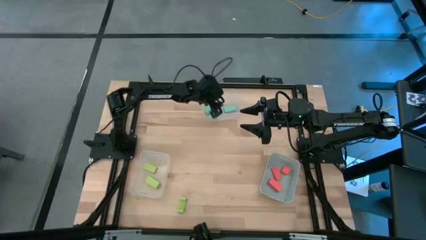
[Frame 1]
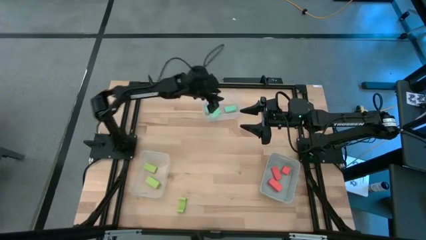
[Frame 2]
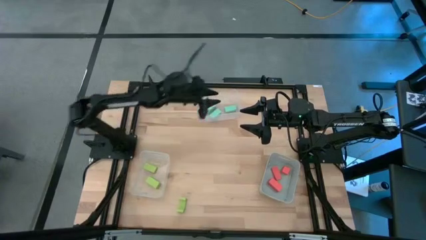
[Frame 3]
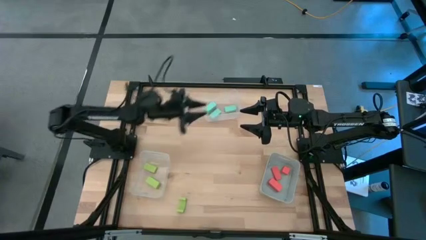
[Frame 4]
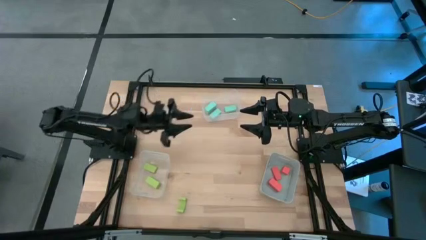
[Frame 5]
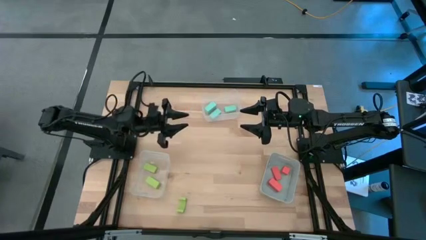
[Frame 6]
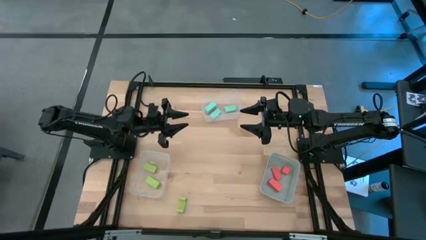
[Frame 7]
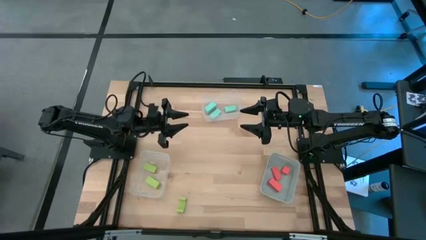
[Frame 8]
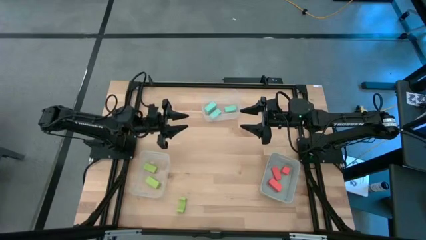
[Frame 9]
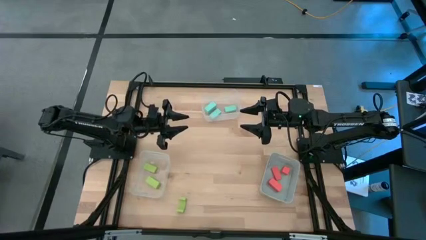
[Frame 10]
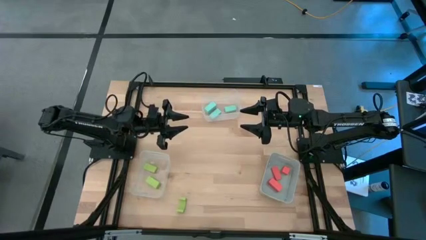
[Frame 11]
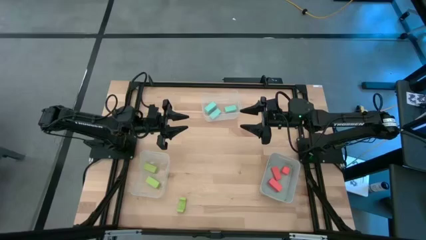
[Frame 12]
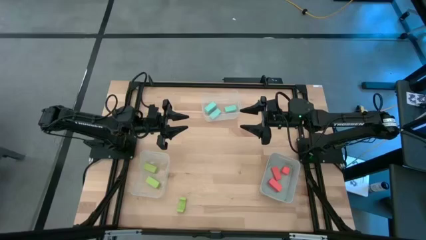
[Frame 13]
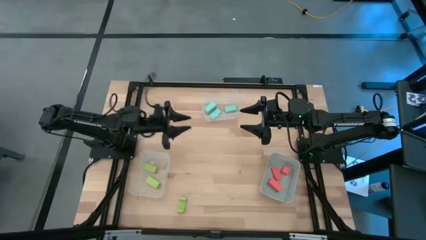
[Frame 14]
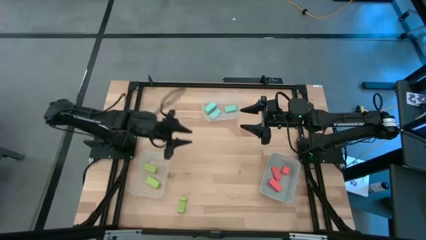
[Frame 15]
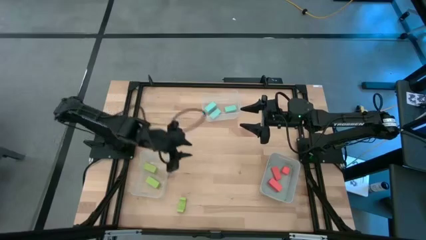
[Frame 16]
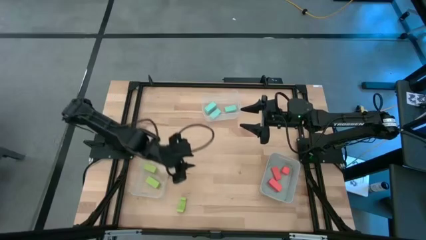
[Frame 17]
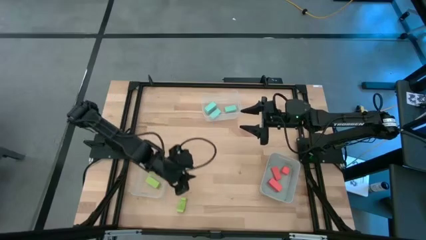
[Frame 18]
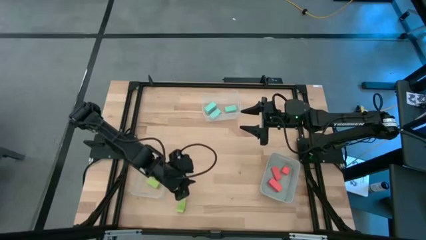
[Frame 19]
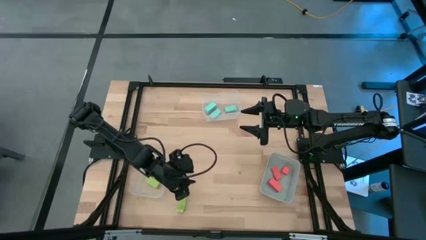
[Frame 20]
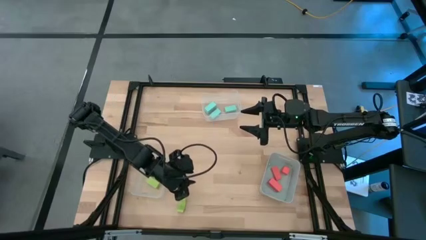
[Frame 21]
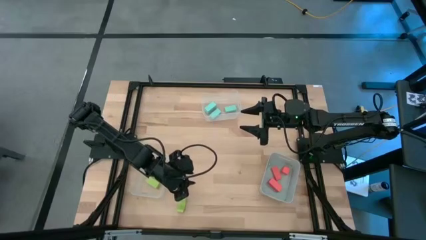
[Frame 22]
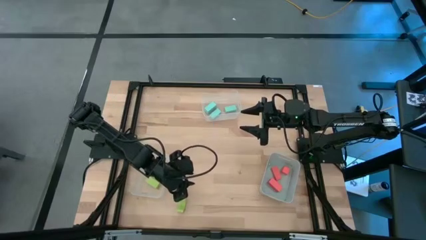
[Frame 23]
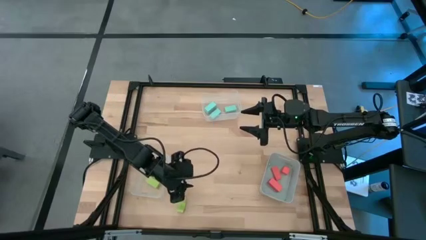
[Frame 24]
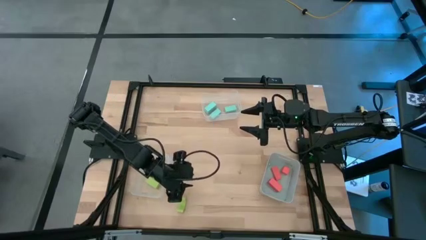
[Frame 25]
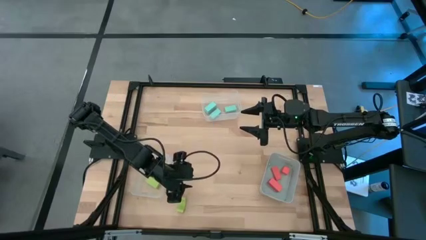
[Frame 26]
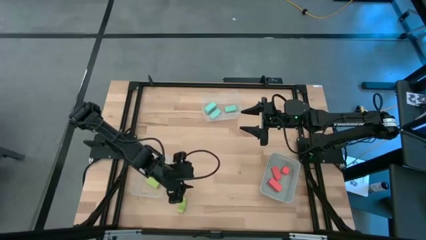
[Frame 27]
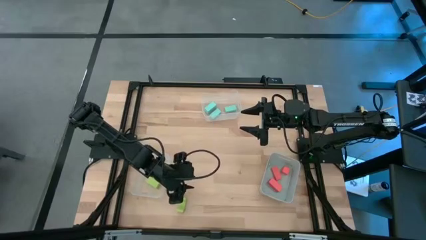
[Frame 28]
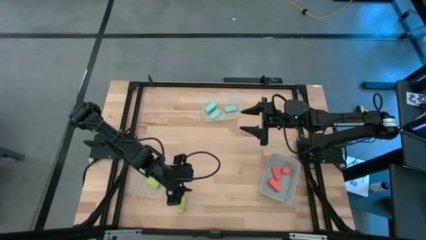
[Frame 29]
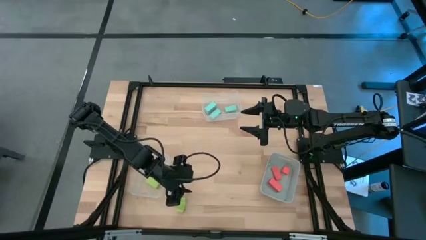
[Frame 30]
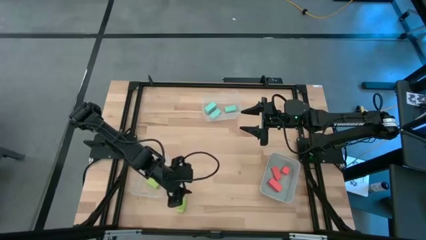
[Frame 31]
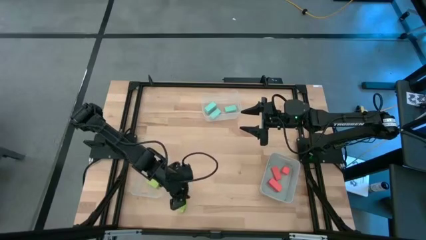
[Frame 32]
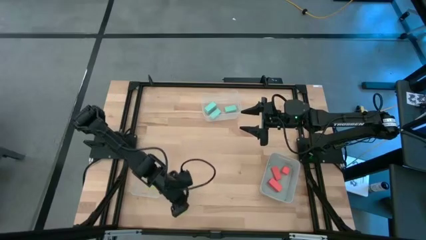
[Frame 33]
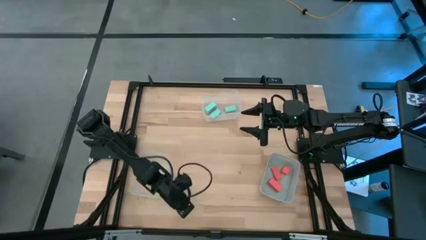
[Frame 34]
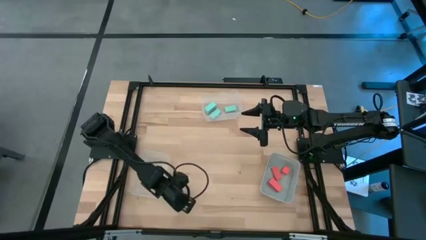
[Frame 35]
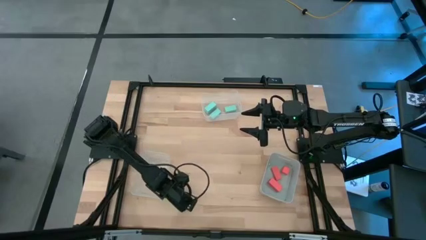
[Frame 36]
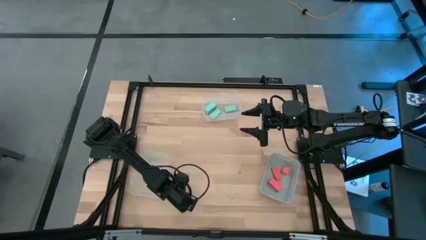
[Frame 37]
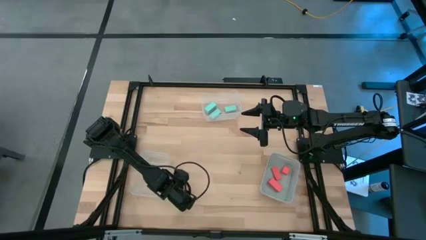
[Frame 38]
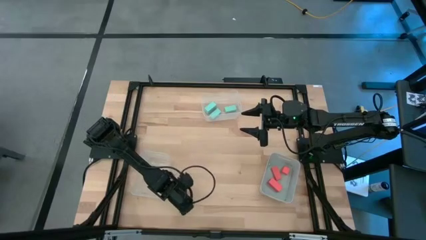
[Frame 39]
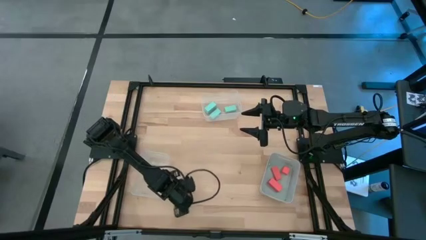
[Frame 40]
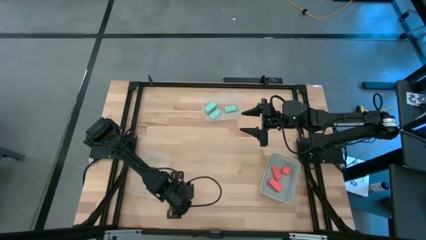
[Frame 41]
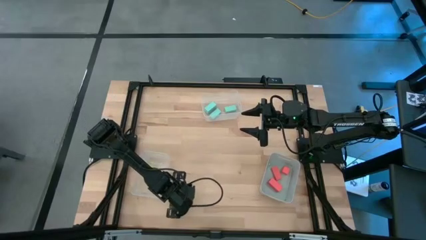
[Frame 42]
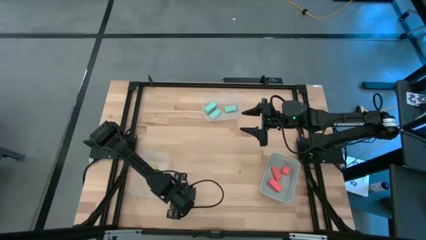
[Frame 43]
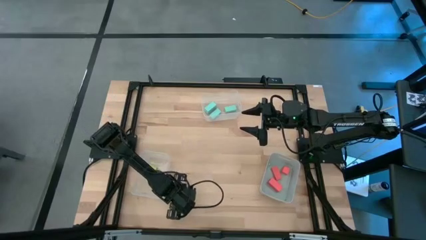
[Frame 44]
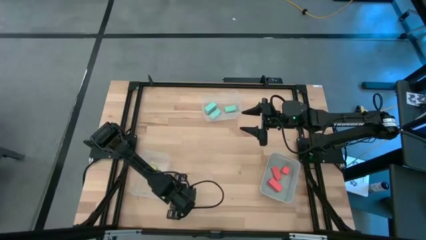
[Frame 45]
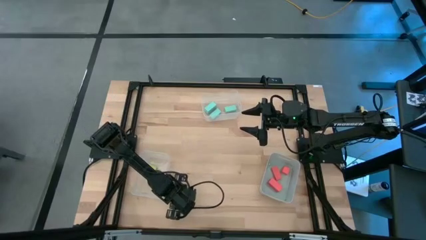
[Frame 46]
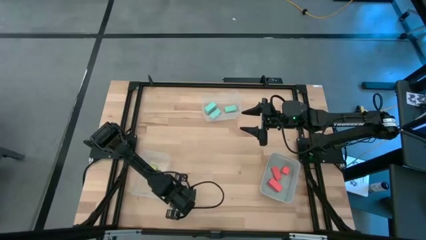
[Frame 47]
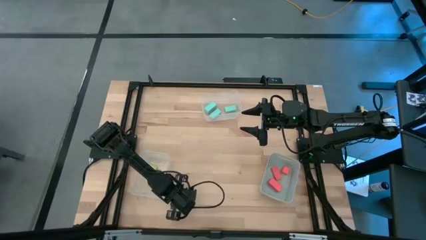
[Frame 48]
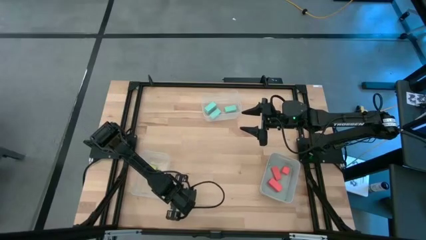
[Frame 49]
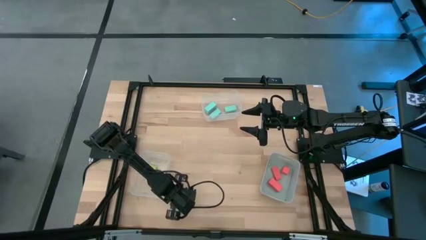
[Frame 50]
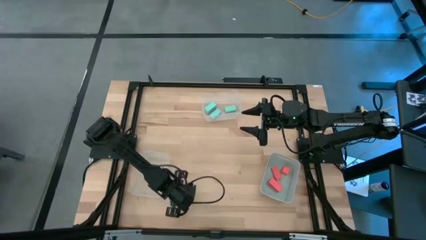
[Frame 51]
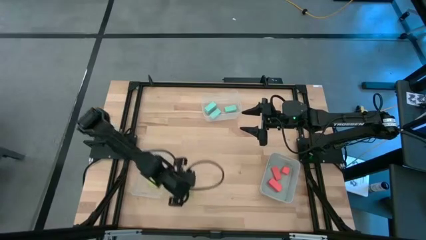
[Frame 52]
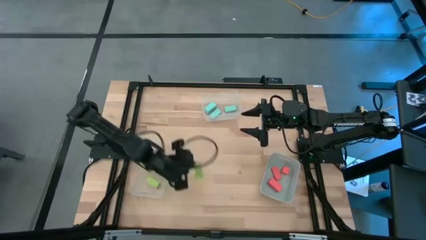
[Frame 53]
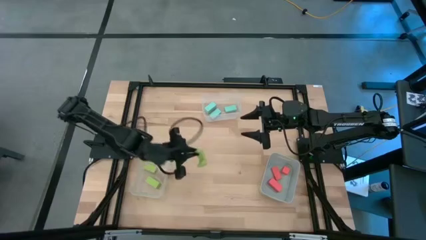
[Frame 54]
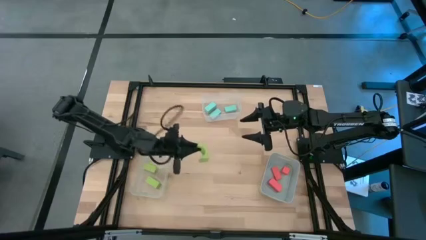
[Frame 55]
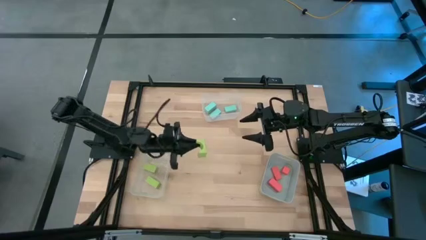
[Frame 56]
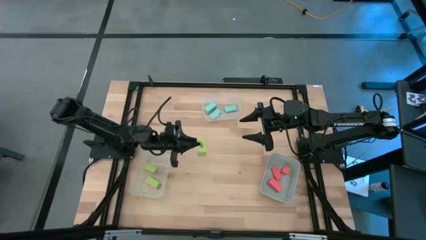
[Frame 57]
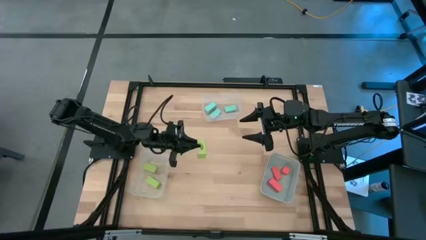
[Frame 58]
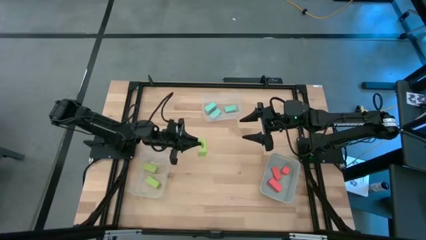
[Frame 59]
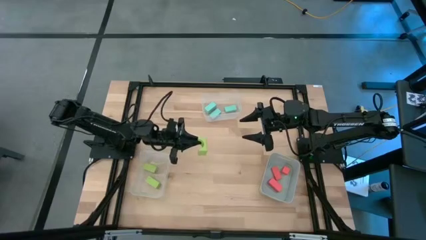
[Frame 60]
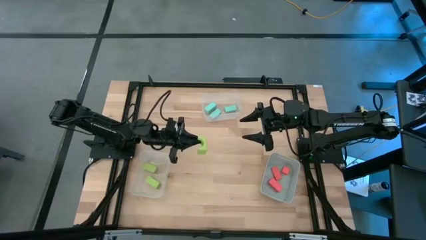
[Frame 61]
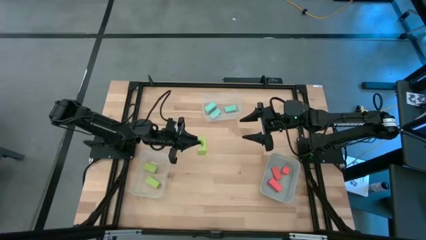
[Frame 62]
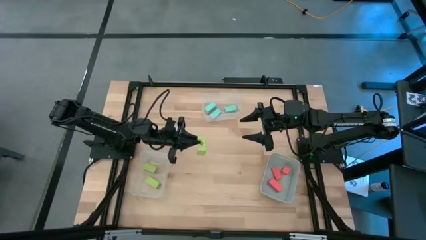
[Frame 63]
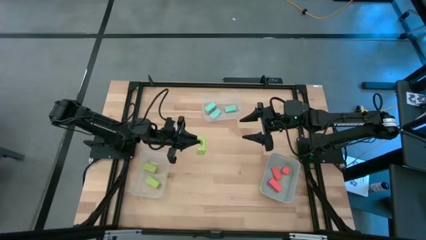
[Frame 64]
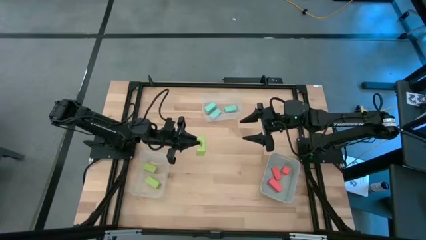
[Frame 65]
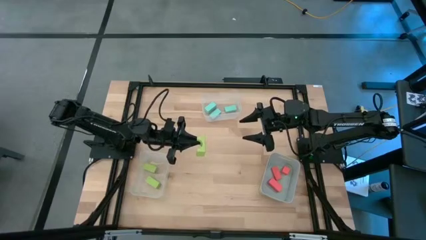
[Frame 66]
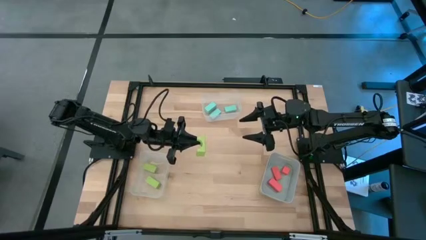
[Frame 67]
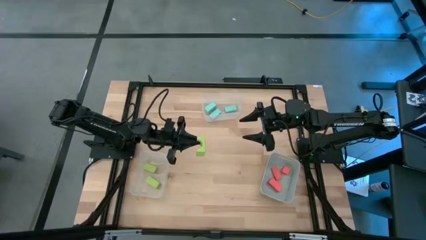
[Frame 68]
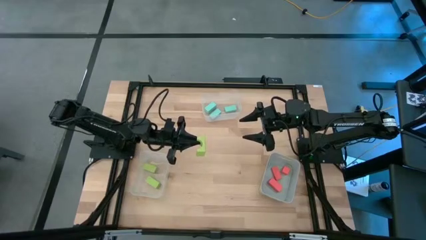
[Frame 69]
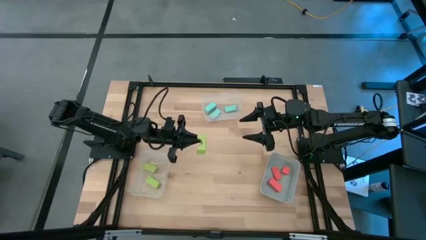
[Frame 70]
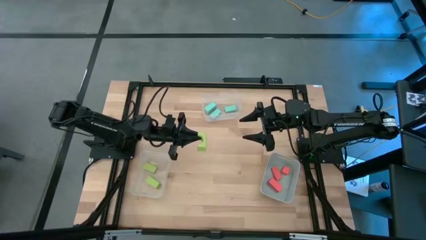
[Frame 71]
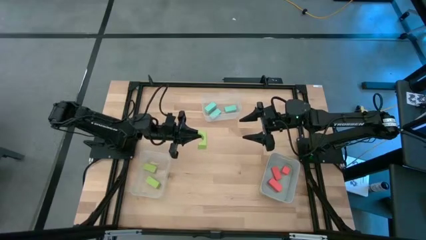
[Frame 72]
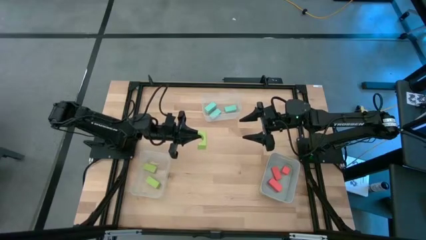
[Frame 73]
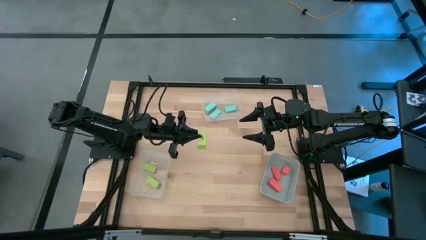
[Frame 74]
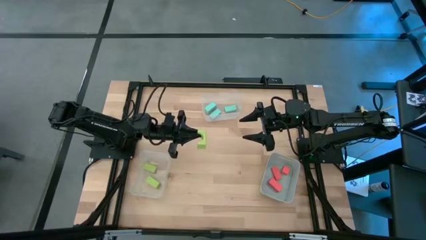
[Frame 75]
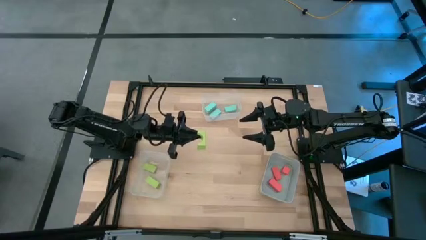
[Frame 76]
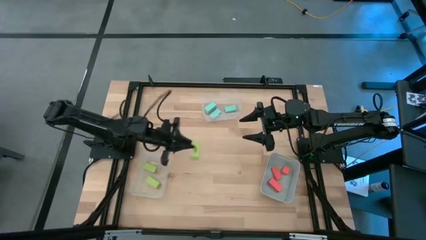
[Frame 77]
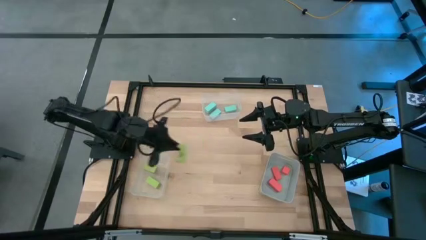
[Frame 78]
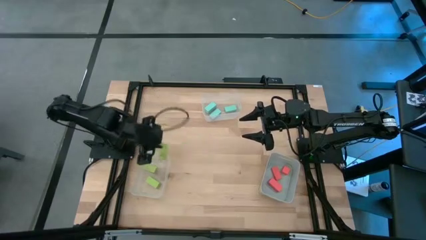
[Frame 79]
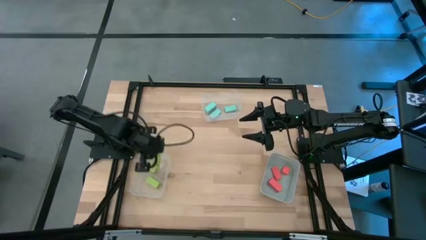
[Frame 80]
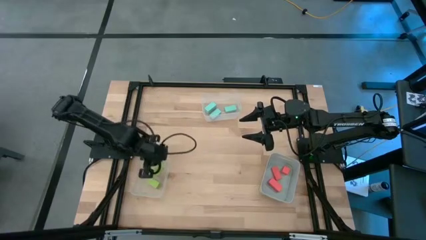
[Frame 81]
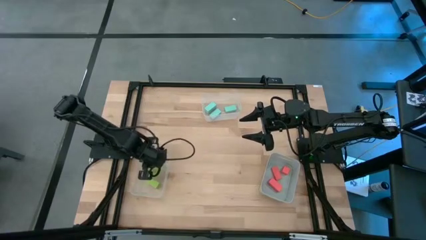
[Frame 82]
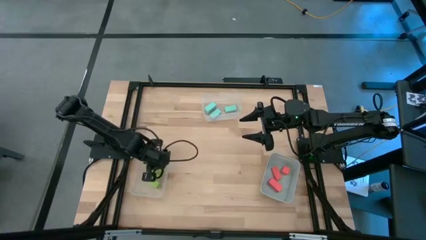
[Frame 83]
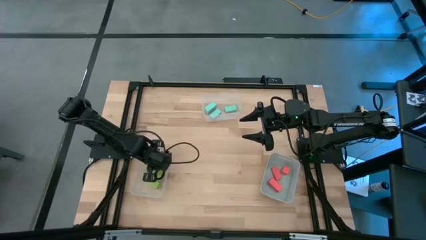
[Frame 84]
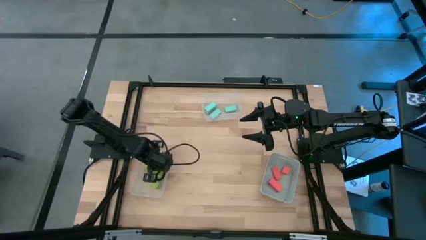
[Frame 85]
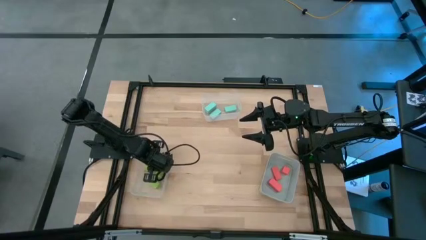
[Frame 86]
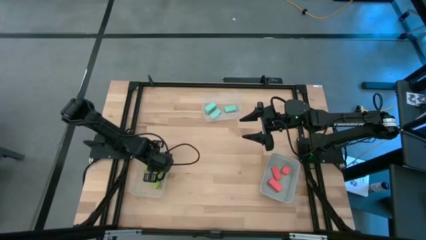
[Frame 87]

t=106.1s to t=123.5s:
Task: Sort & place blocks by color
Put the green block into the bottom transparent bin
